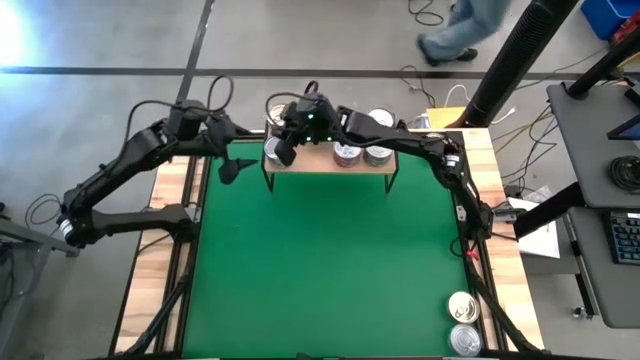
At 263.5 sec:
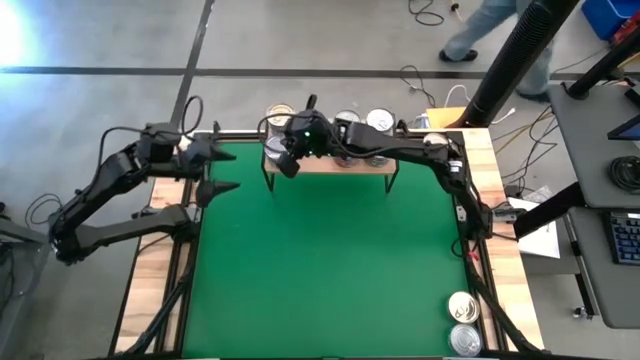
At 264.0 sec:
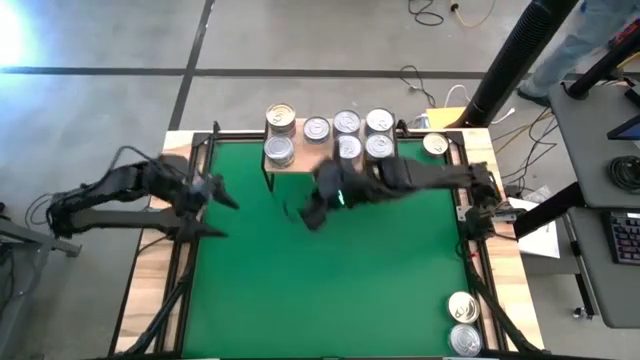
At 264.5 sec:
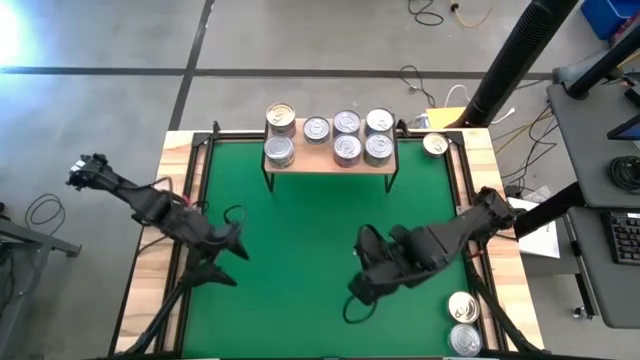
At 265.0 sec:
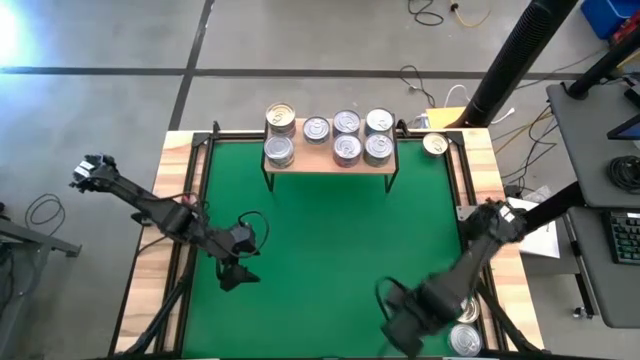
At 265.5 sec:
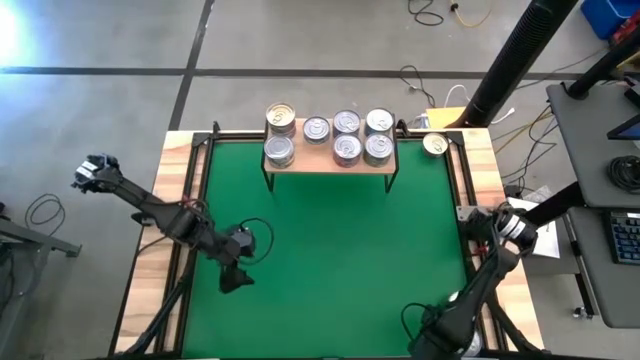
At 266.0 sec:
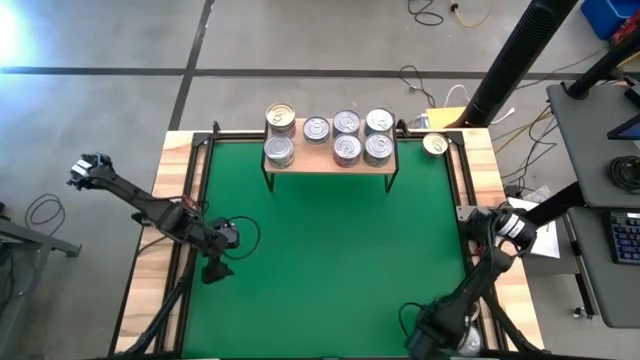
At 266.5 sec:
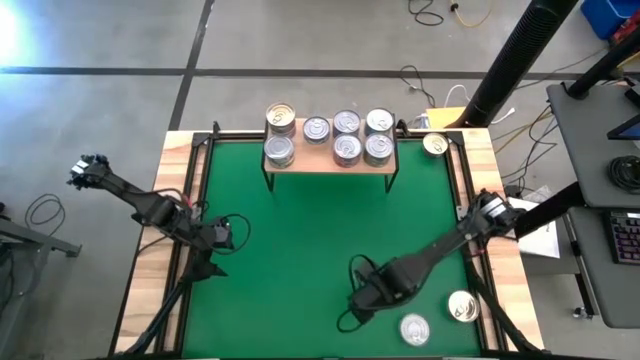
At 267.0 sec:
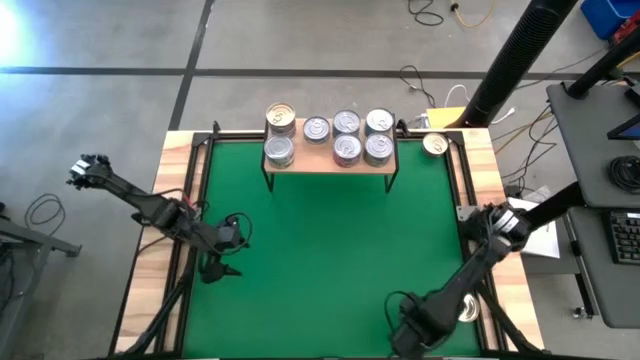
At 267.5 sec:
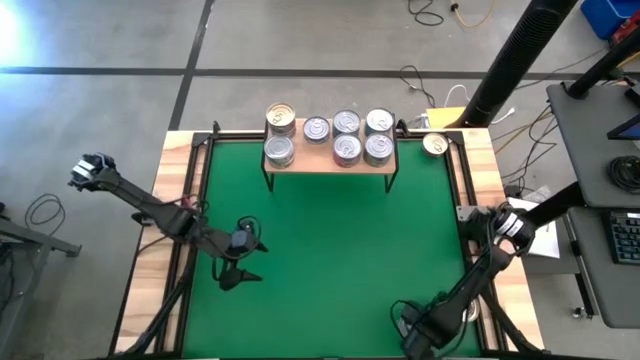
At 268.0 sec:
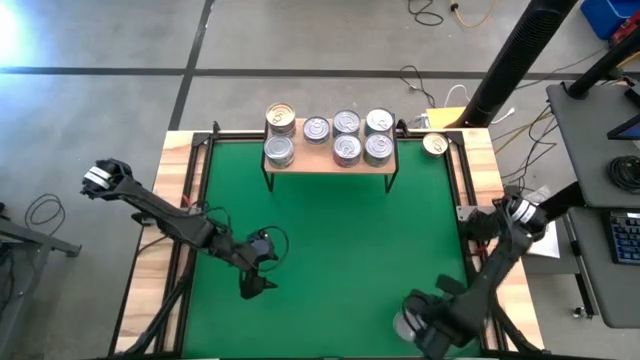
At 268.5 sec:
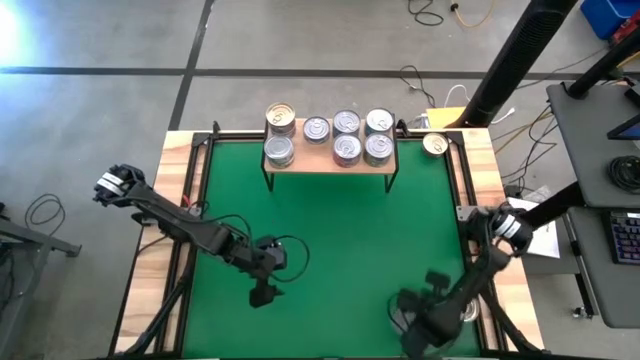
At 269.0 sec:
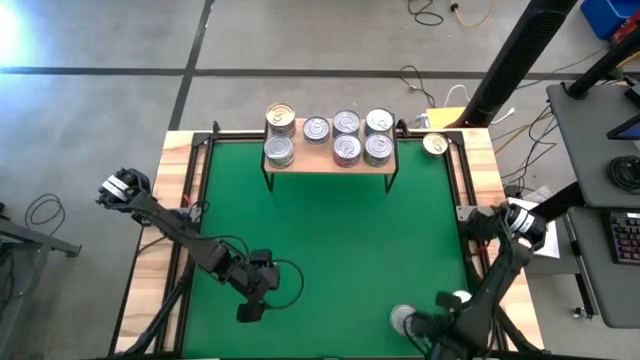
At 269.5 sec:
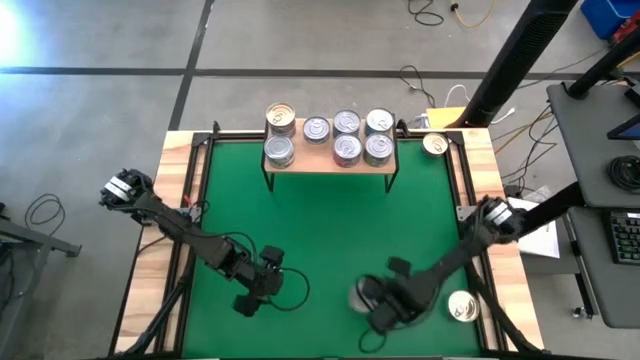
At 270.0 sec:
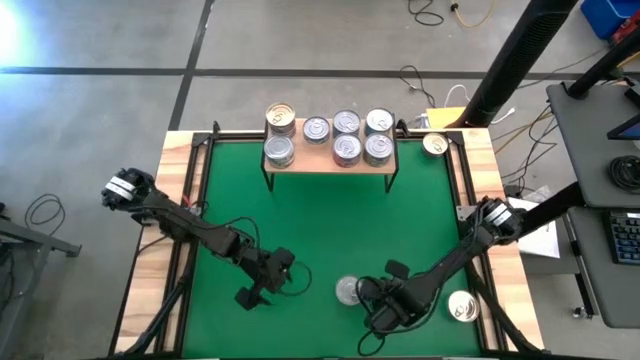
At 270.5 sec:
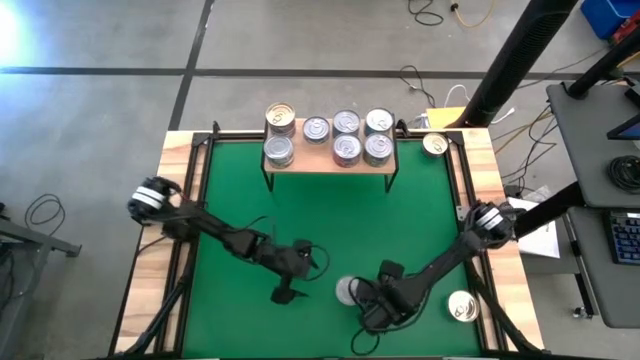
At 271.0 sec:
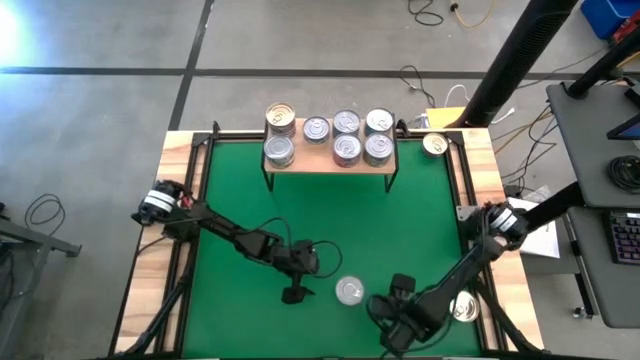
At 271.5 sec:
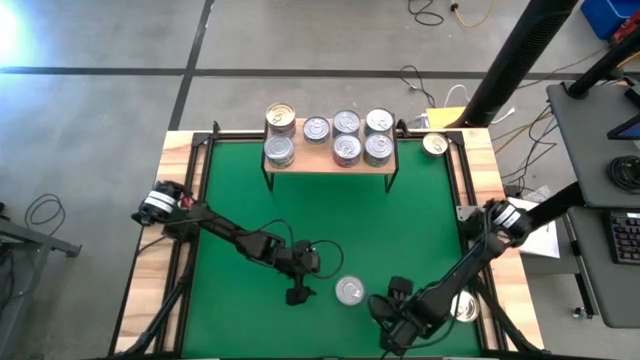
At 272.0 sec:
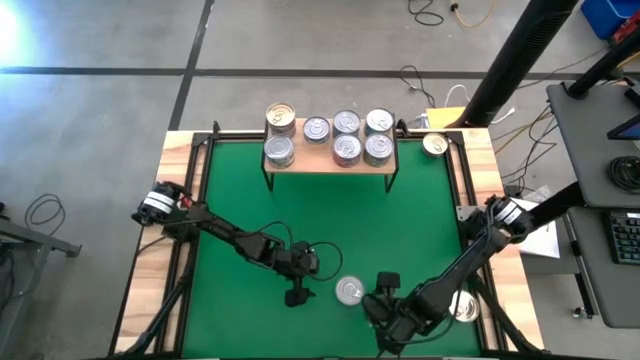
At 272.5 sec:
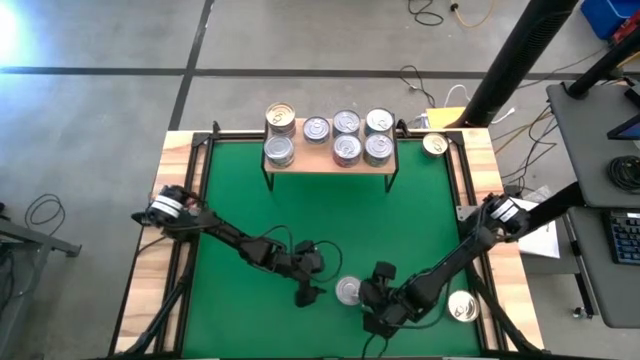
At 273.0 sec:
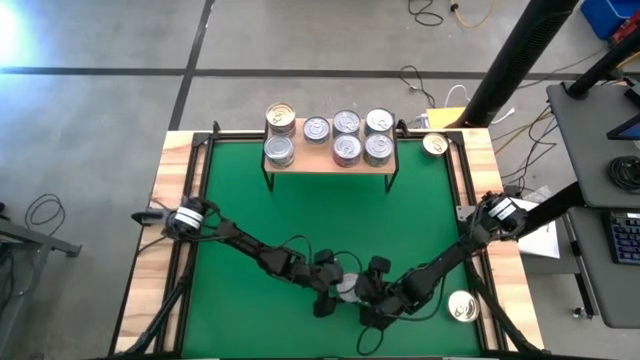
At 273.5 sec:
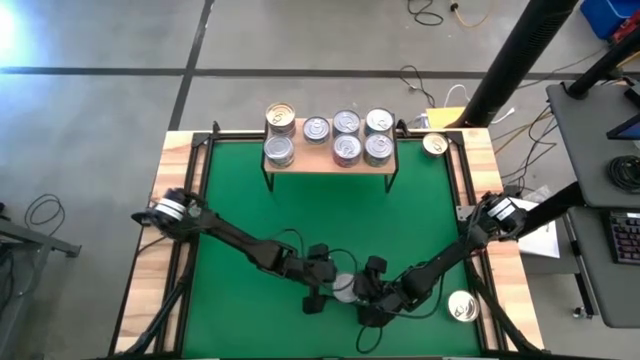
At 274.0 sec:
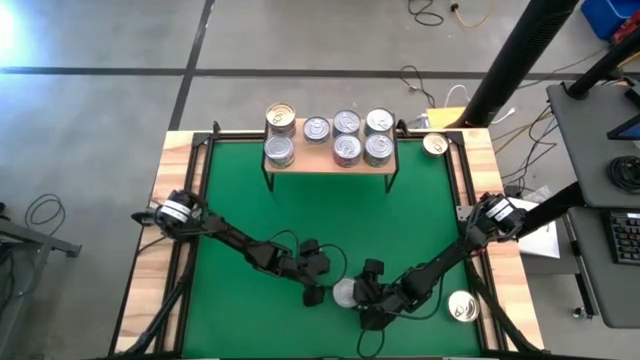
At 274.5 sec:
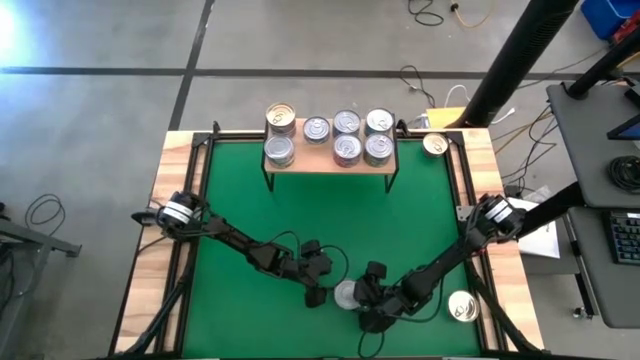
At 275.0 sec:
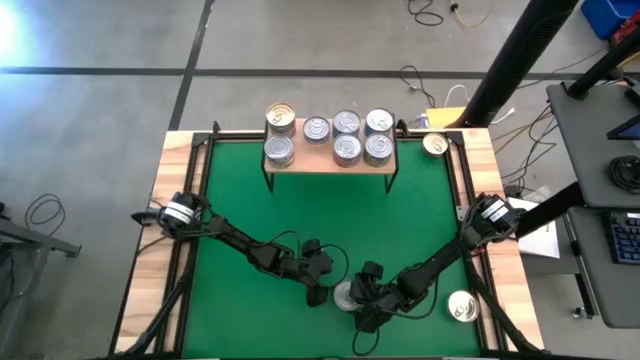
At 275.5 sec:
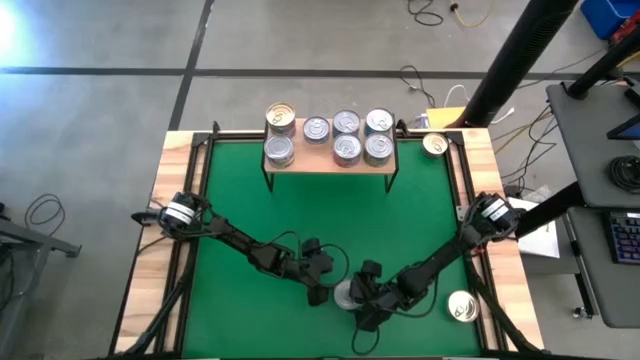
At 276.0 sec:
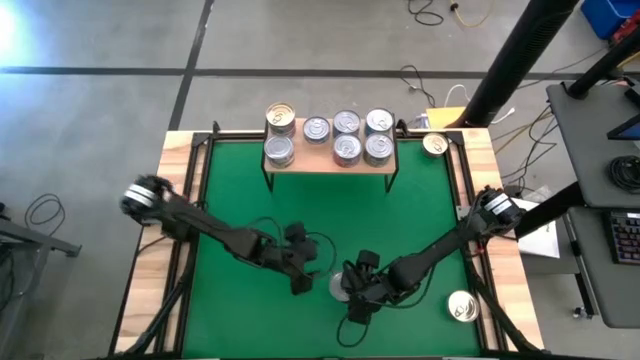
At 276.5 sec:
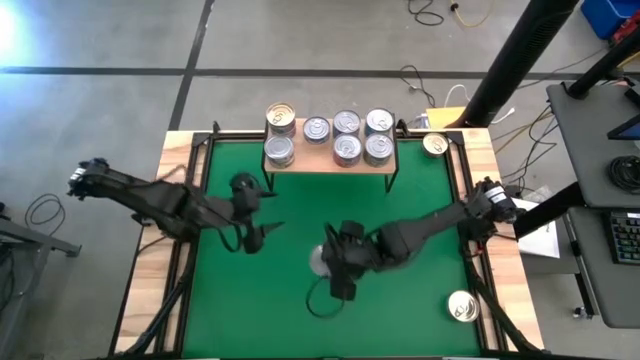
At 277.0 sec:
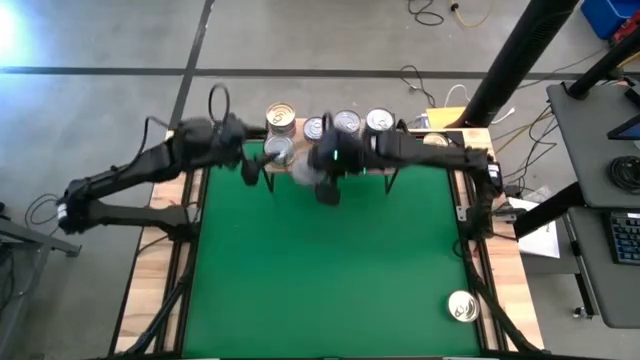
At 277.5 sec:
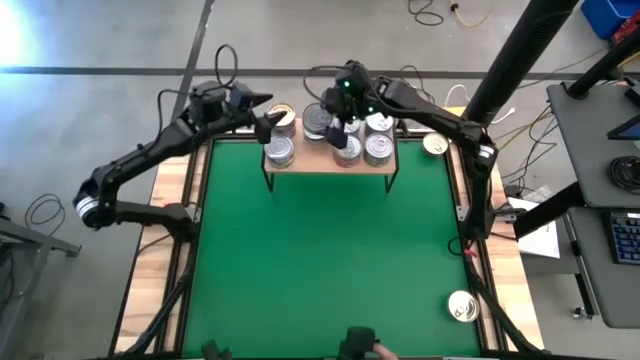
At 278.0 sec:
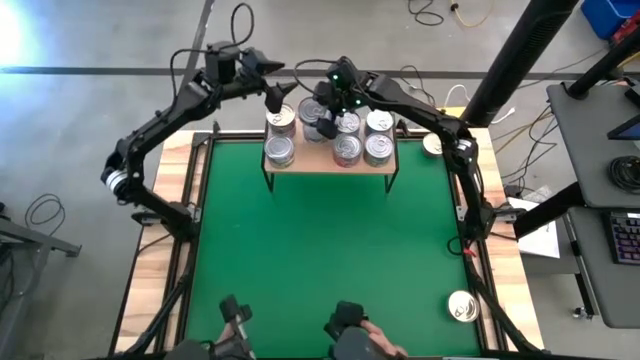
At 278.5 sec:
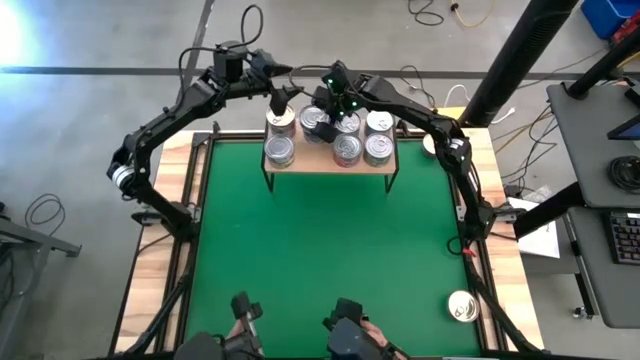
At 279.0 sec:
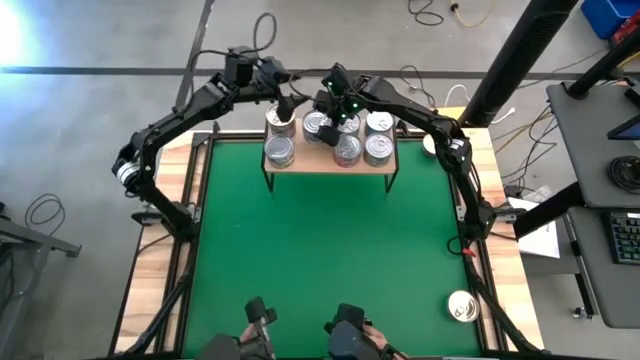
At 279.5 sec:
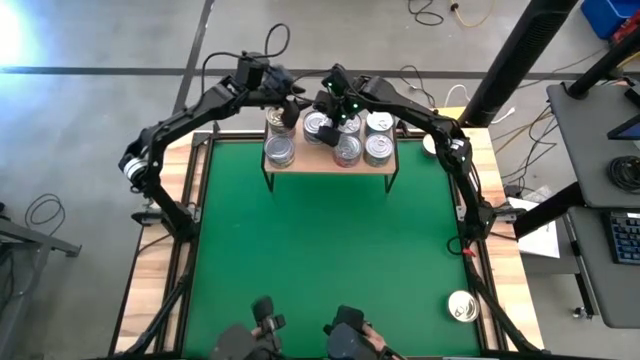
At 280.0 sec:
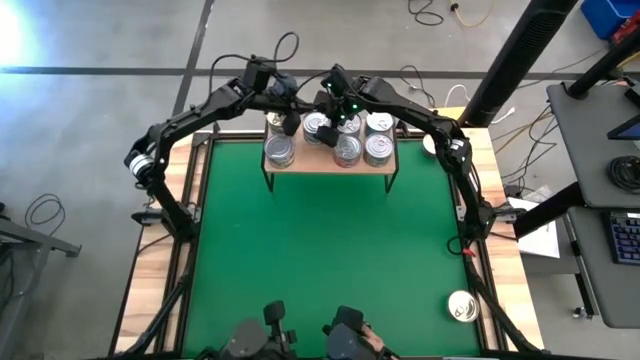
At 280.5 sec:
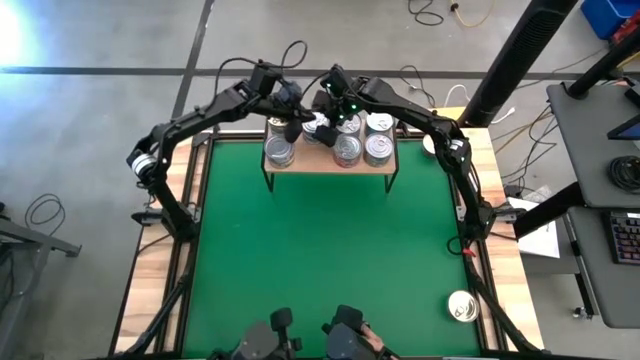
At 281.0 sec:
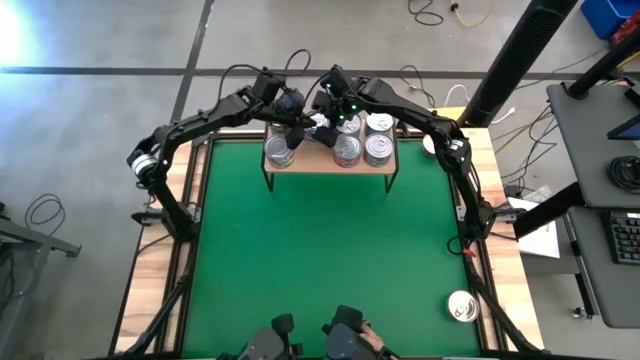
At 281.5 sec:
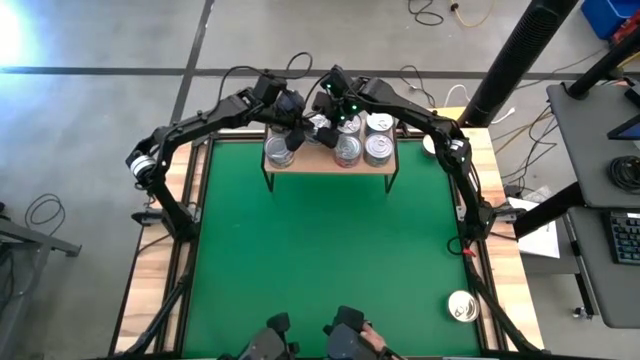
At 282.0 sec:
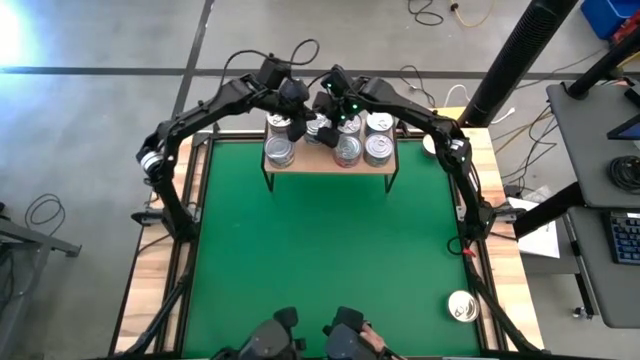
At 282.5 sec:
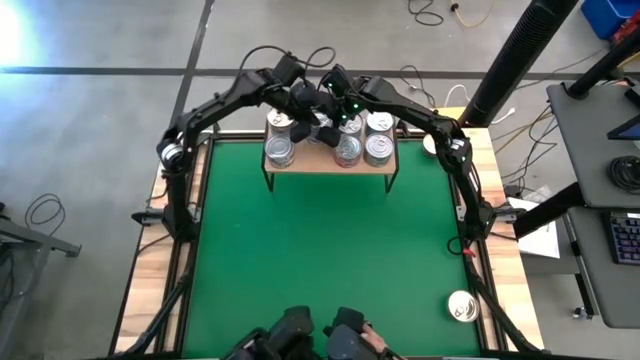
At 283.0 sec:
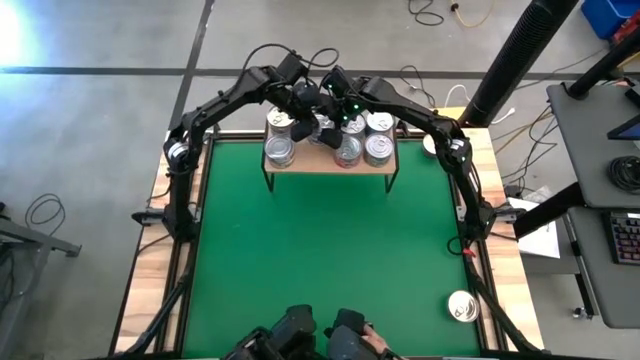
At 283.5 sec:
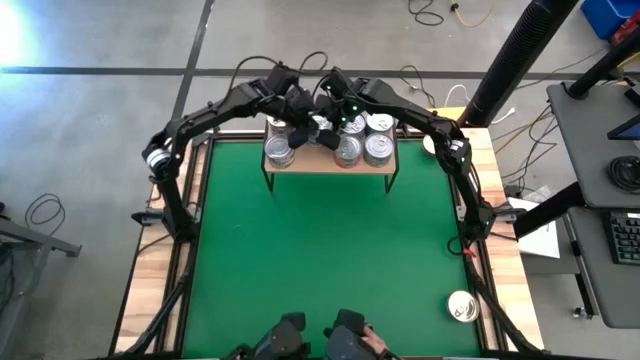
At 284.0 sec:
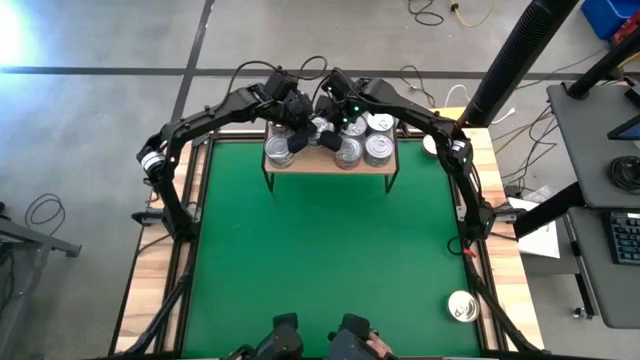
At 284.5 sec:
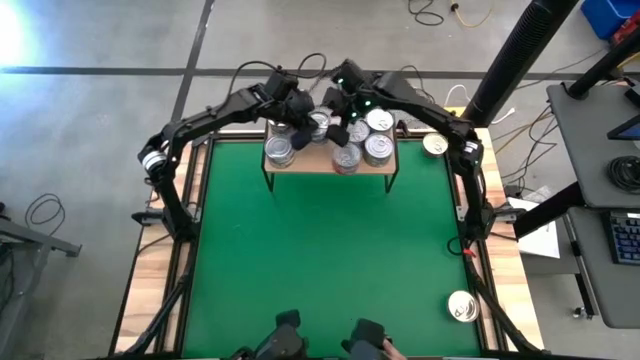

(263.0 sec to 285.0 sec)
Task: Stack canned seafood by type on shelf
Stack the green blue tuna can on top of the green blue tuna can on the shelf
